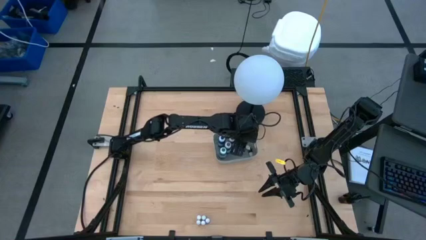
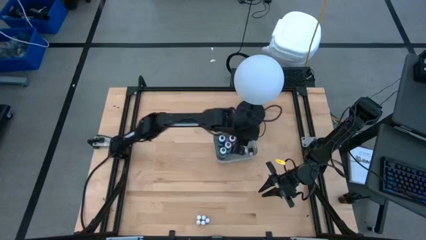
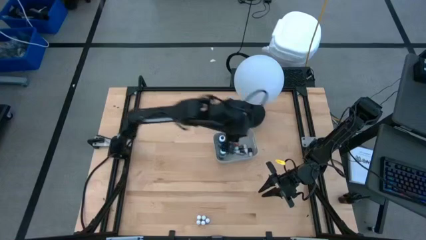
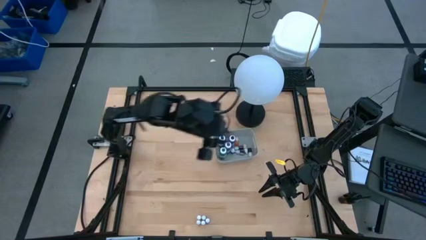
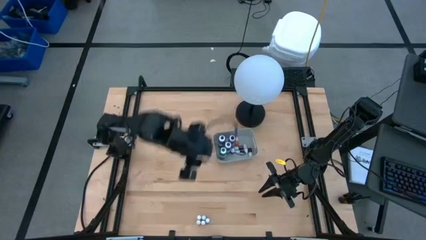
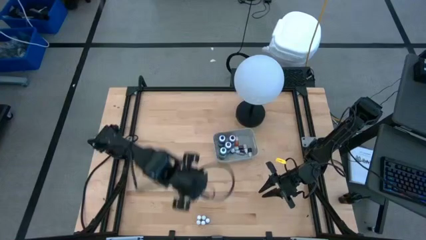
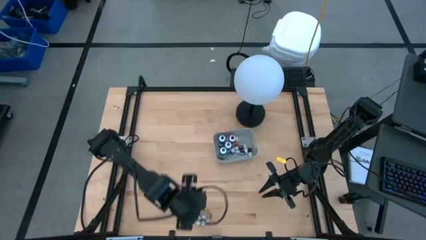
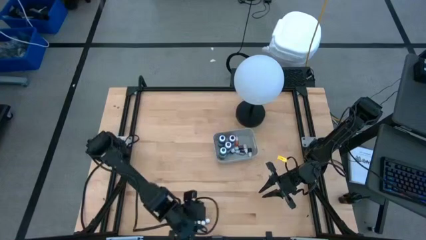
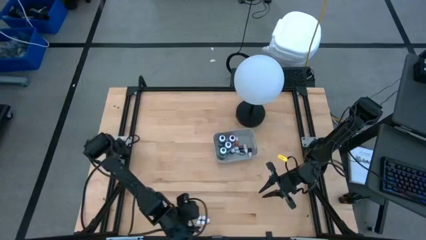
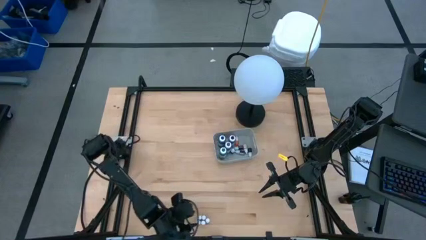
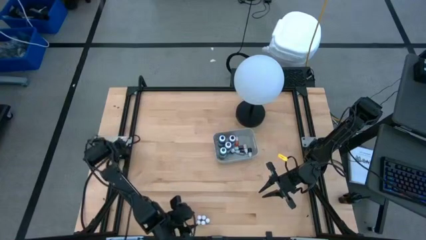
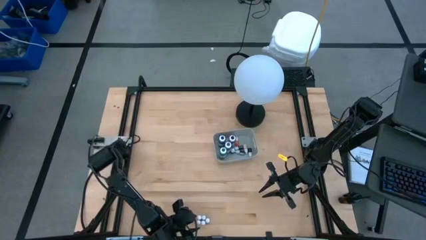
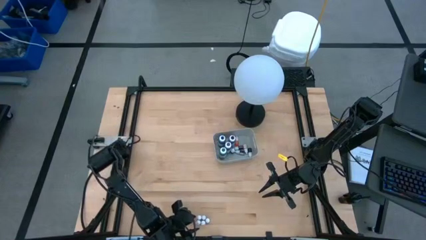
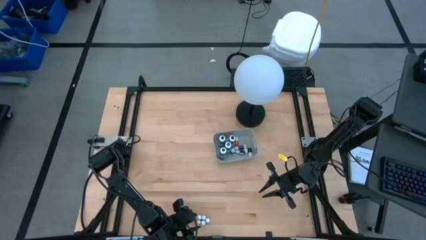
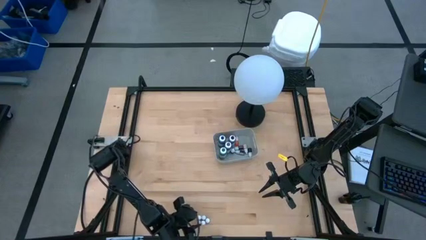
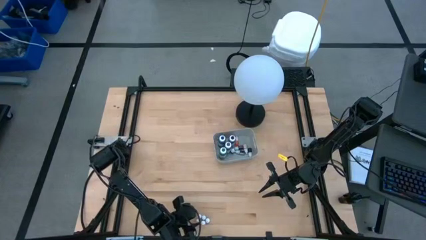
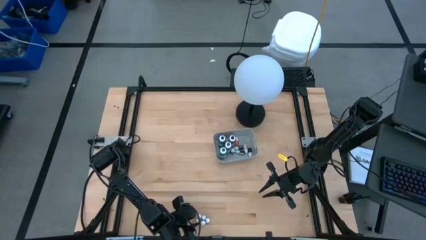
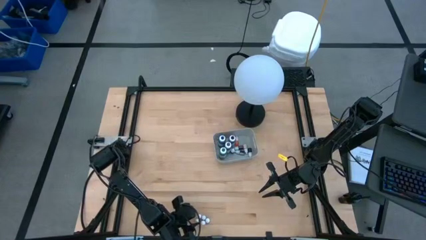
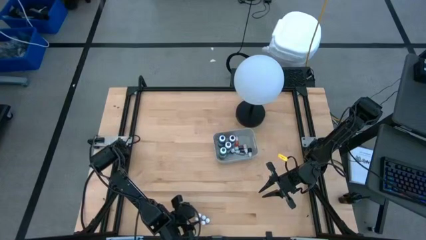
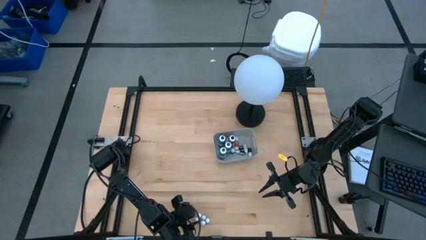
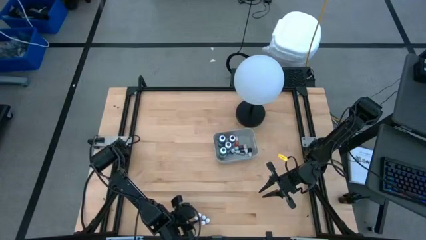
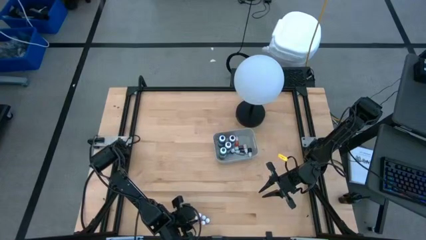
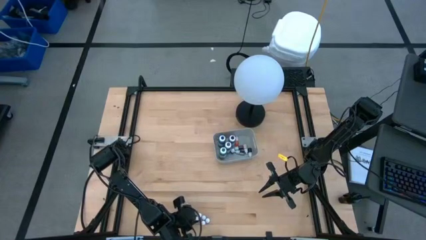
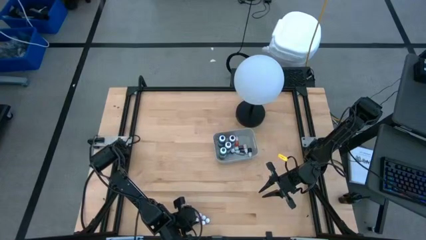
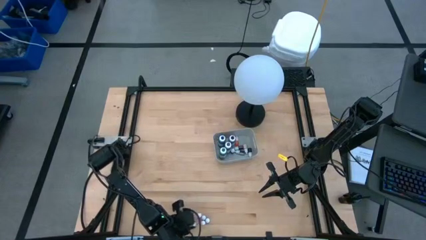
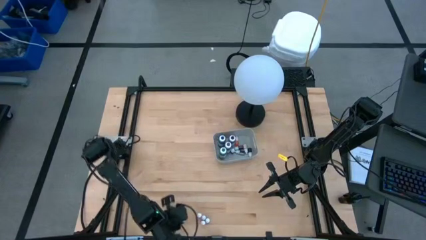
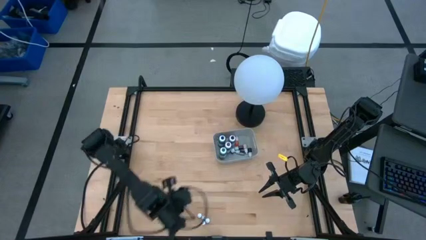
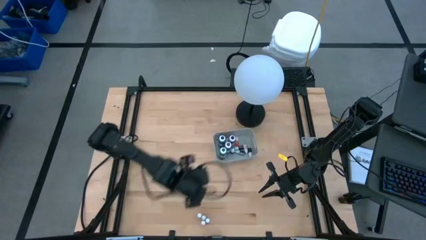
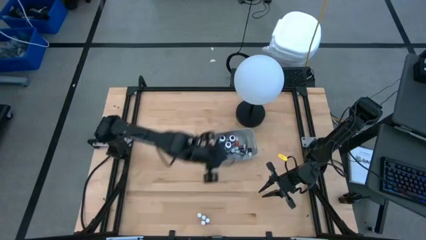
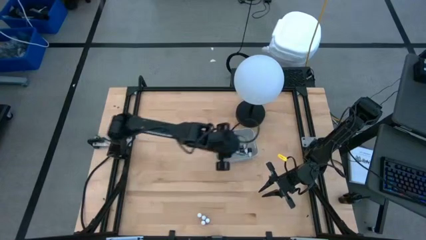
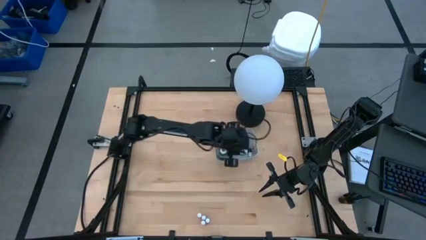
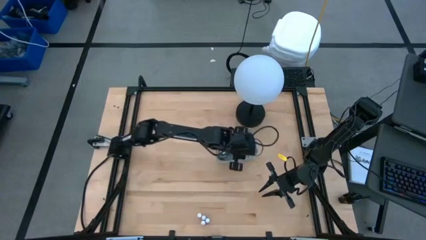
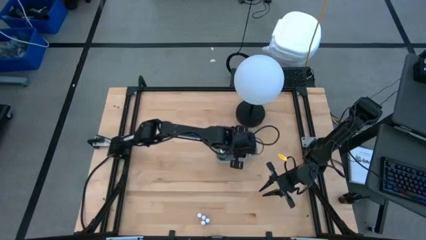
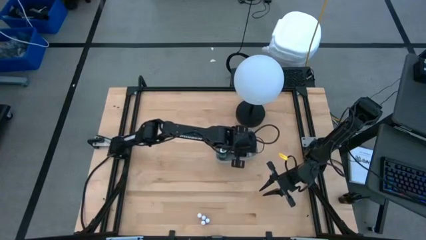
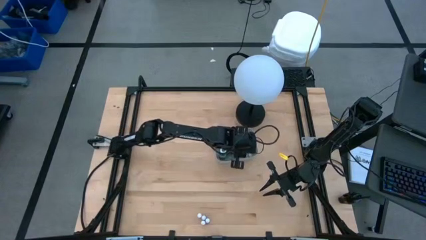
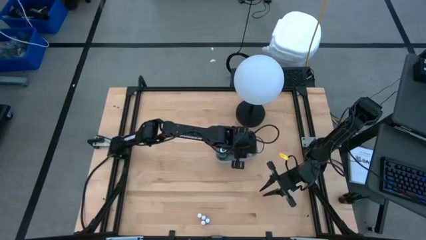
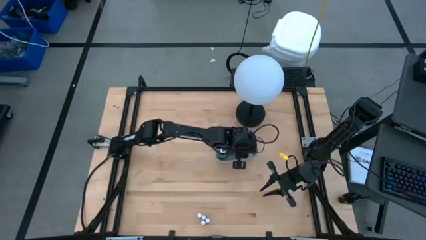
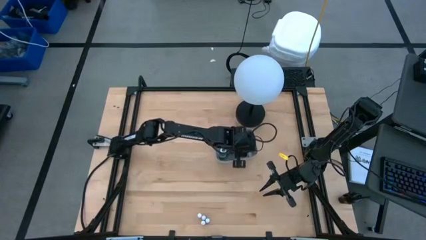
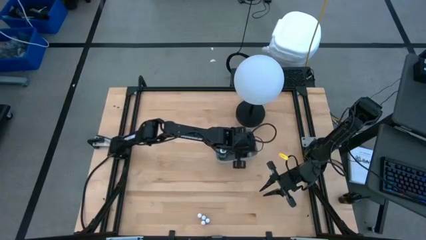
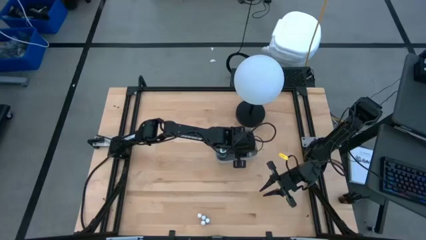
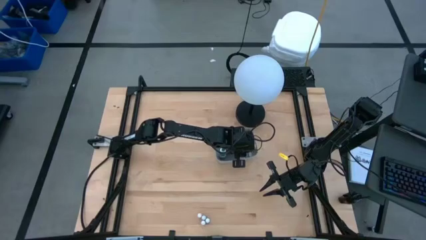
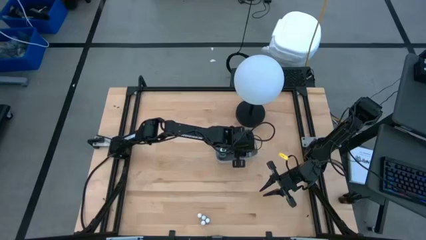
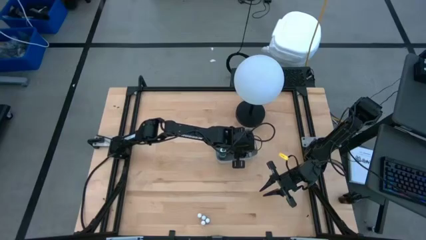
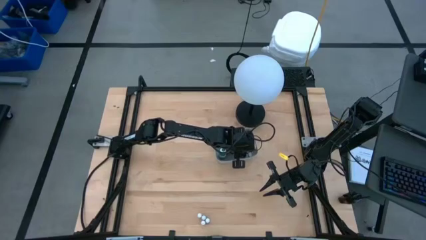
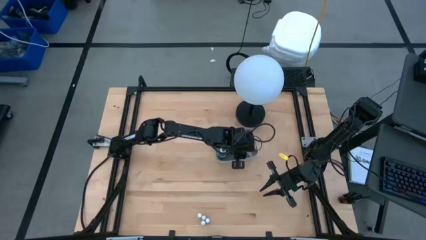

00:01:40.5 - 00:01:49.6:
Task: Pick & Place food coloring
Put the black food coloring bottle into the gray bin

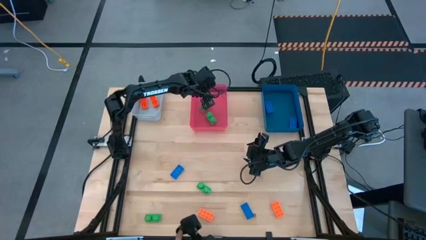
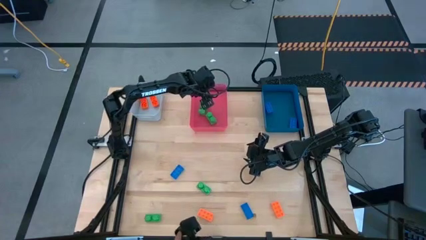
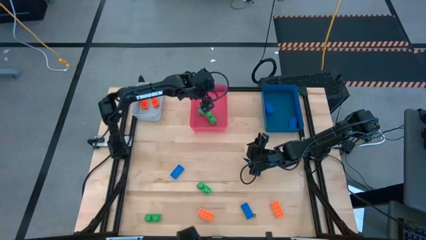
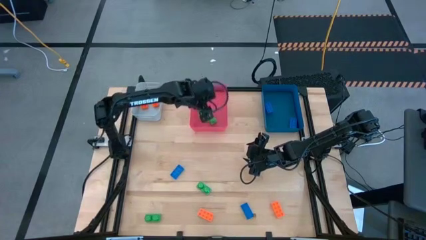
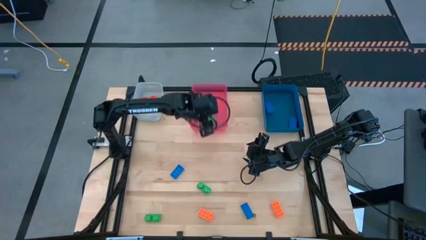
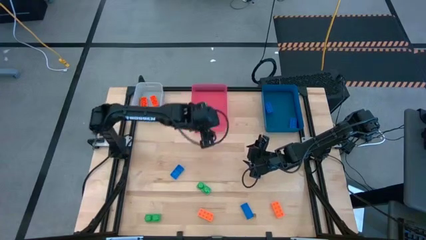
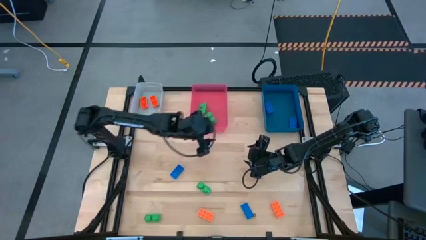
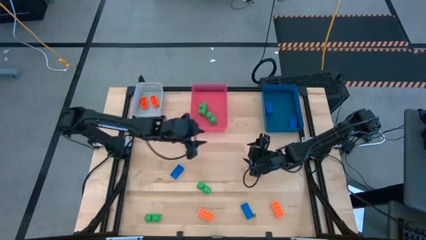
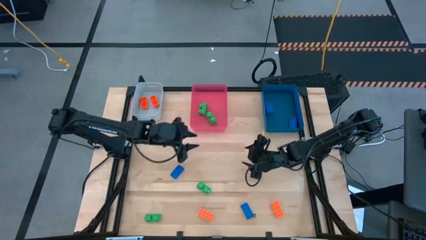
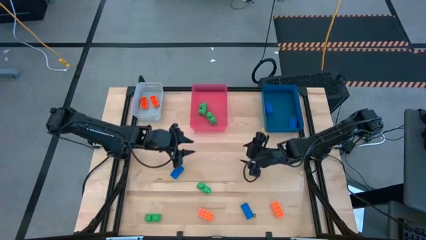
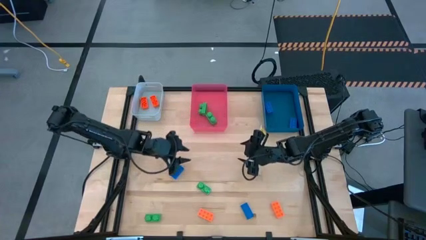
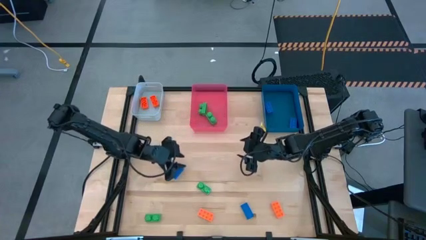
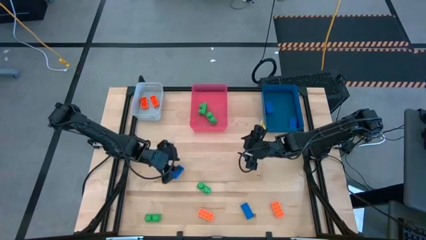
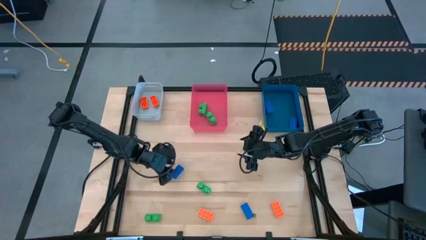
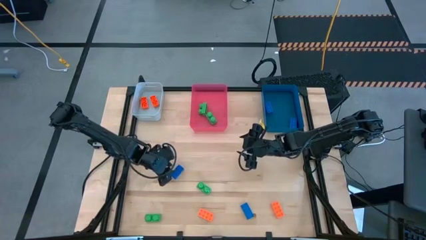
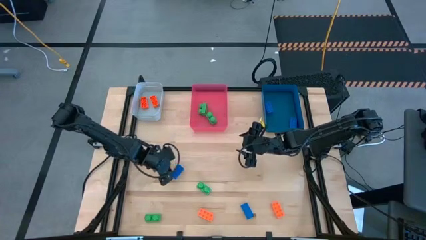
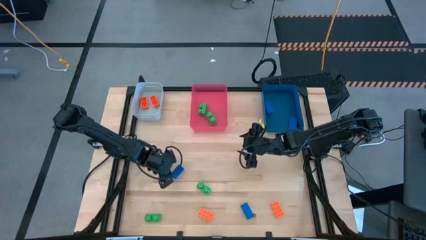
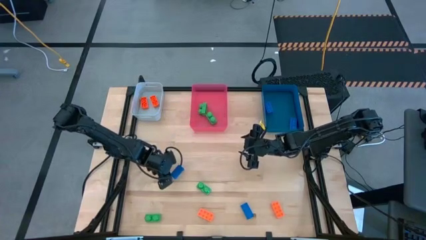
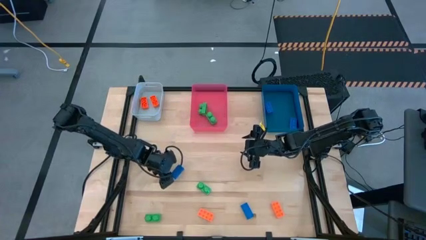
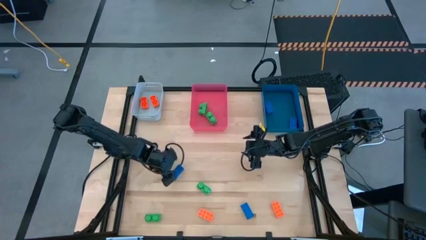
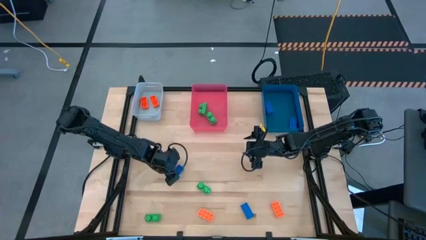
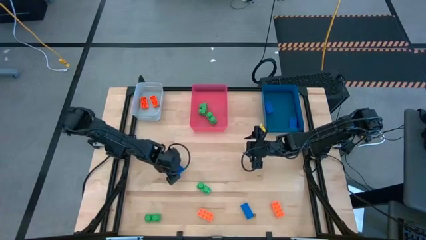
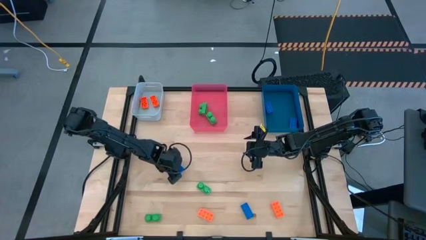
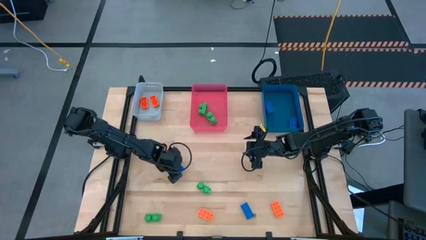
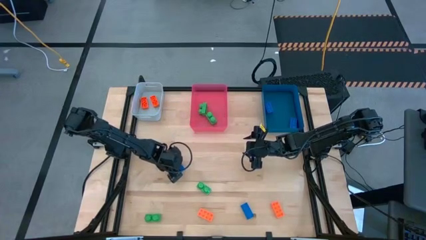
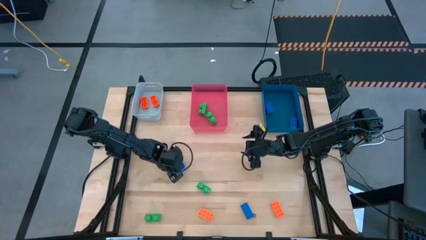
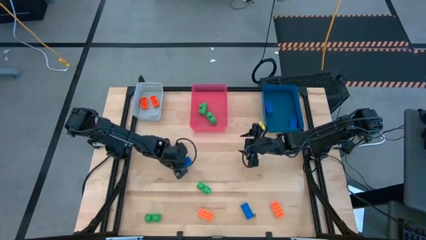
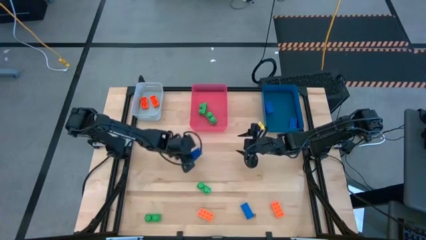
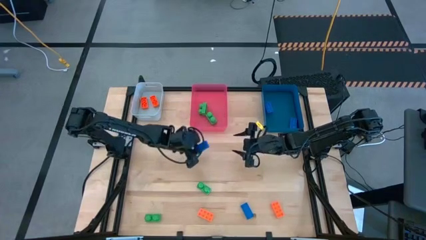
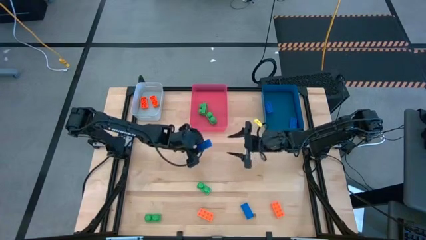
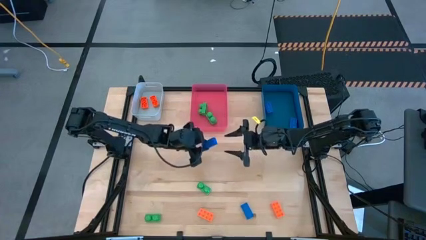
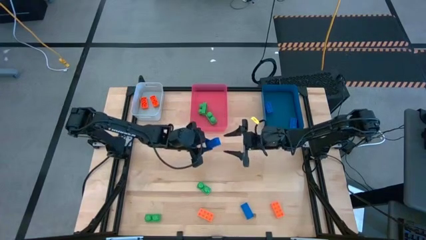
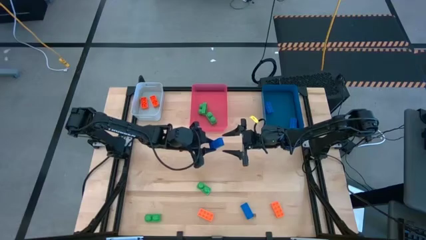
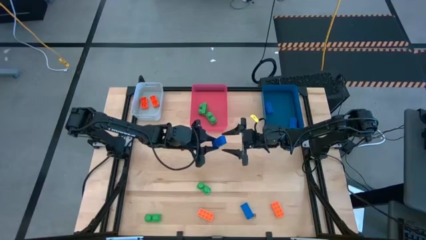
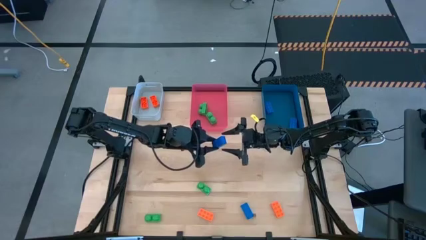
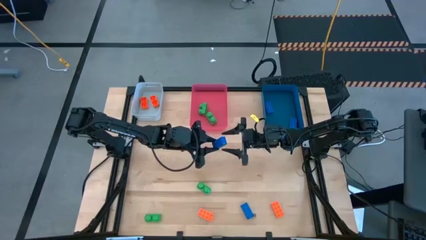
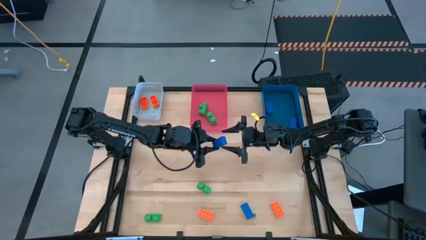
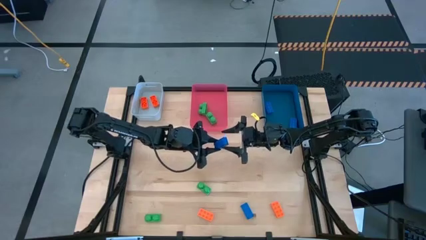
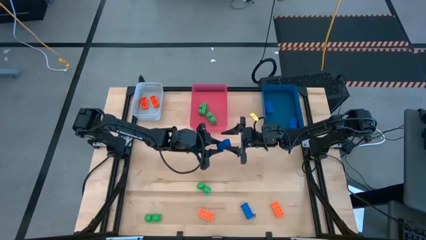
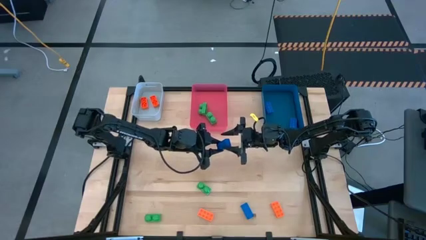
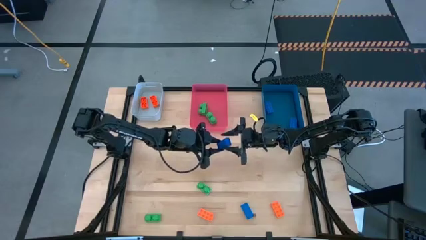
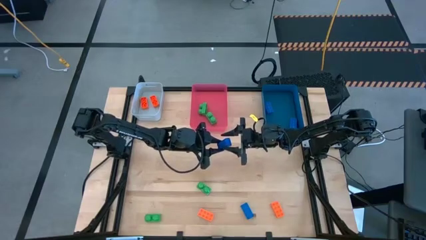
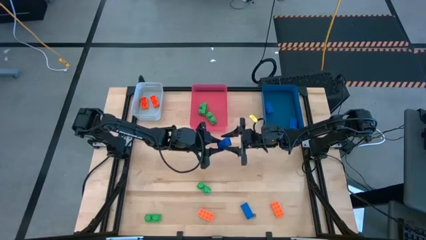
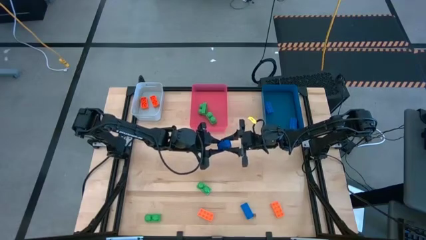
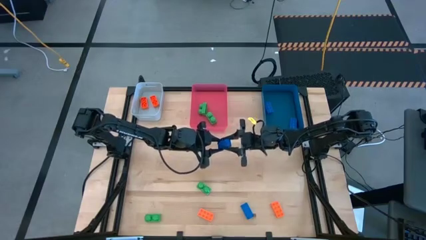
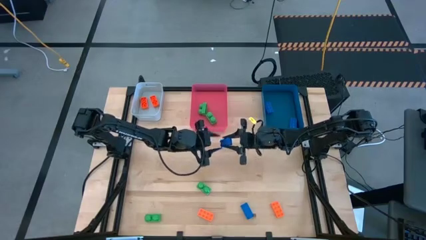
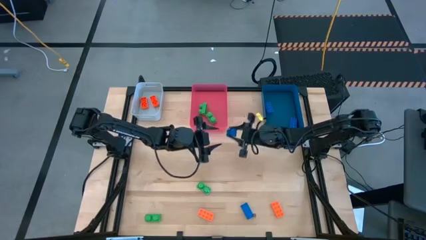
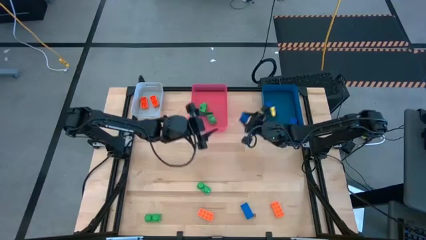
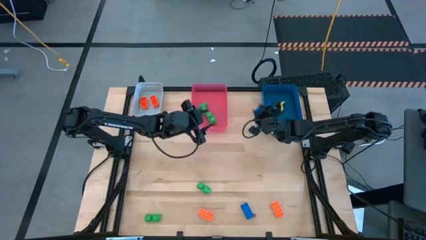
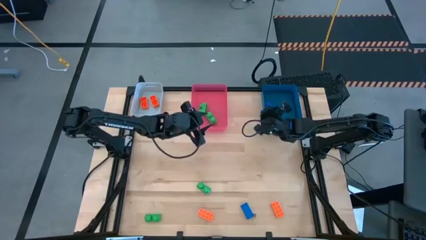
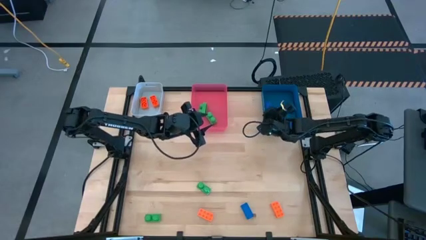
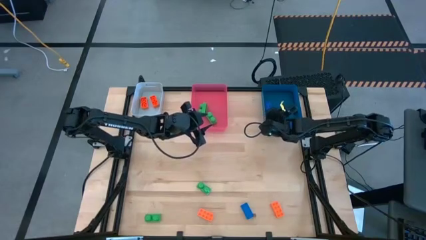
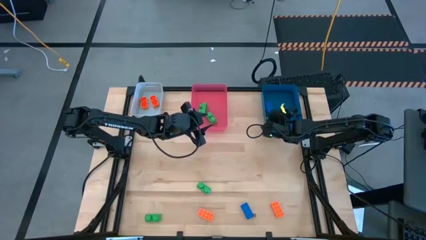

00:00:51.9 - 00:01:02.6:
Task: Sort & place blocks by color
Put the blue game piece into the blue bin
